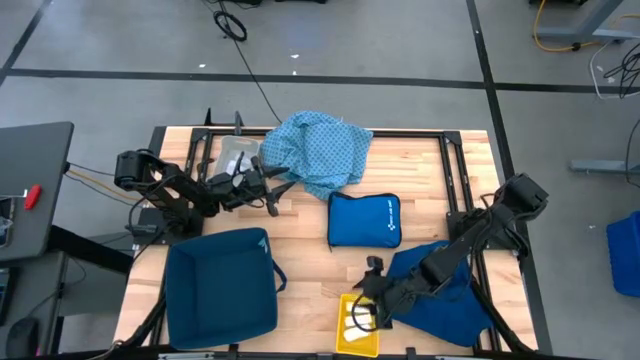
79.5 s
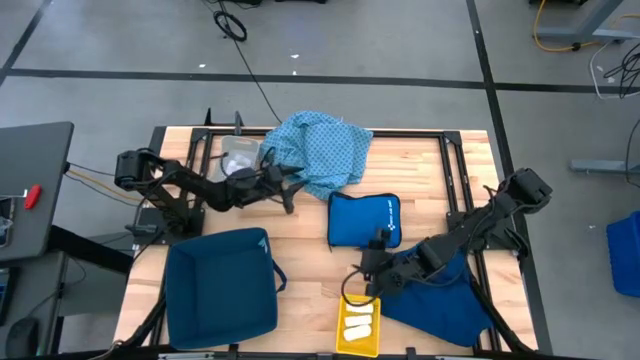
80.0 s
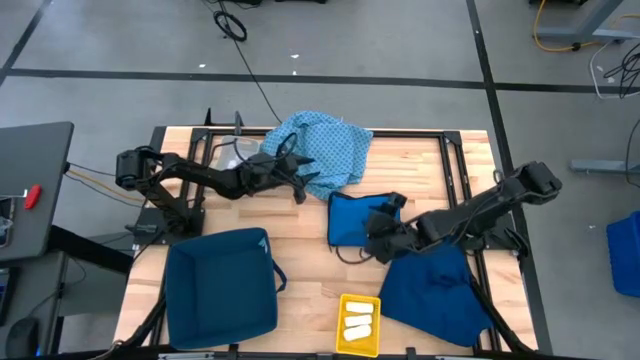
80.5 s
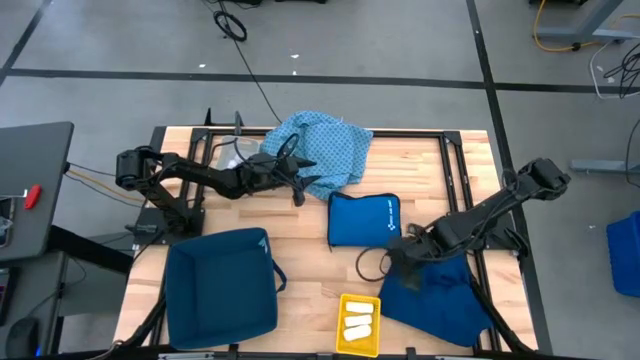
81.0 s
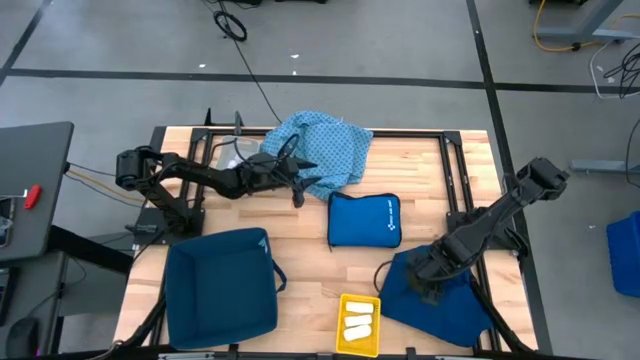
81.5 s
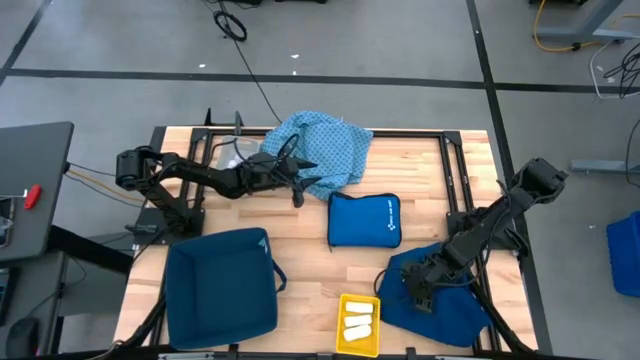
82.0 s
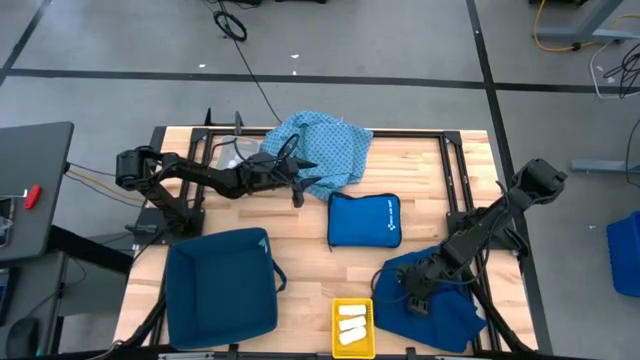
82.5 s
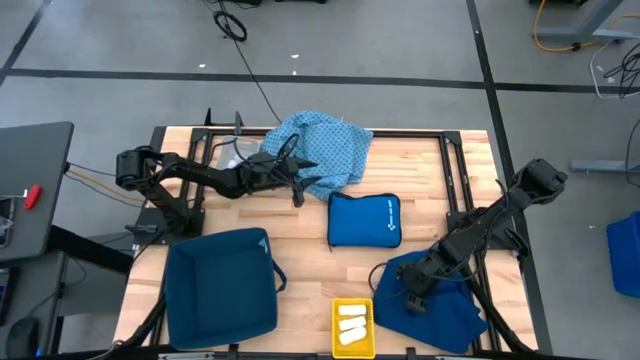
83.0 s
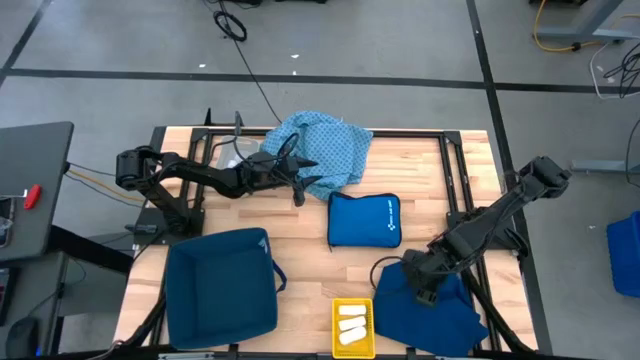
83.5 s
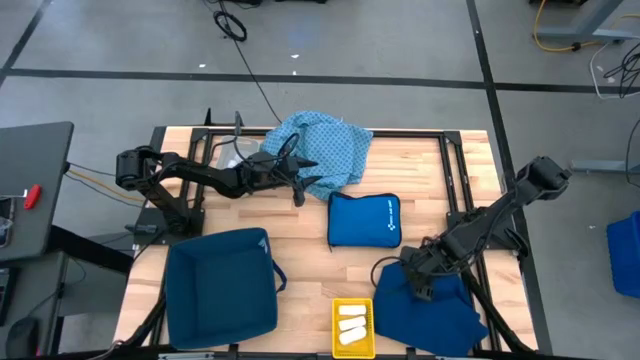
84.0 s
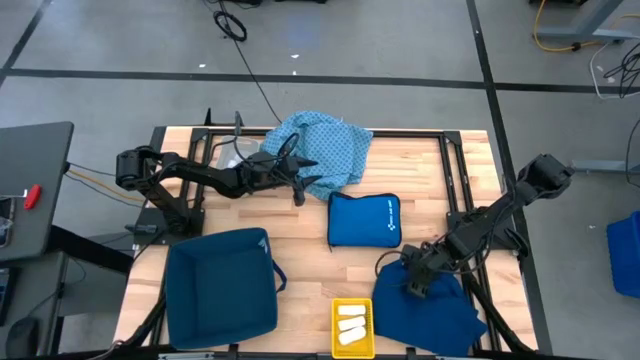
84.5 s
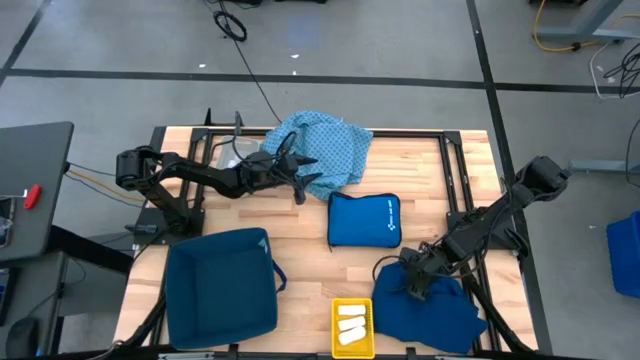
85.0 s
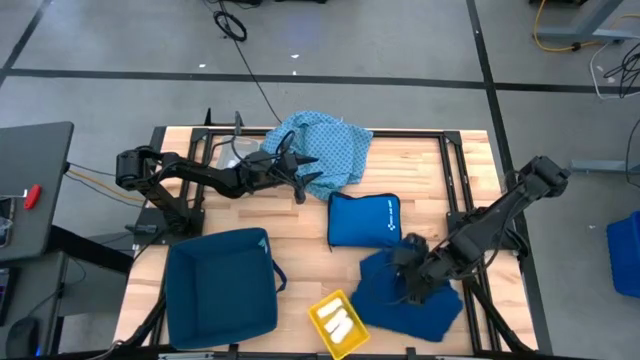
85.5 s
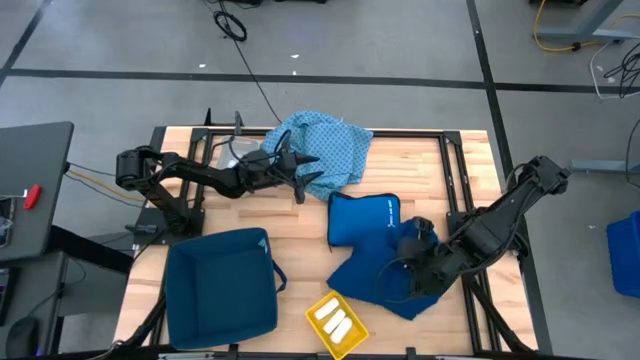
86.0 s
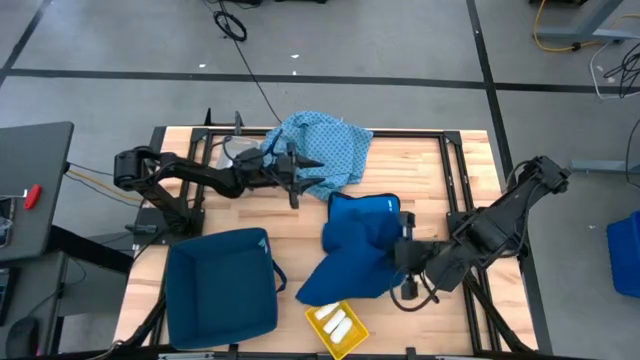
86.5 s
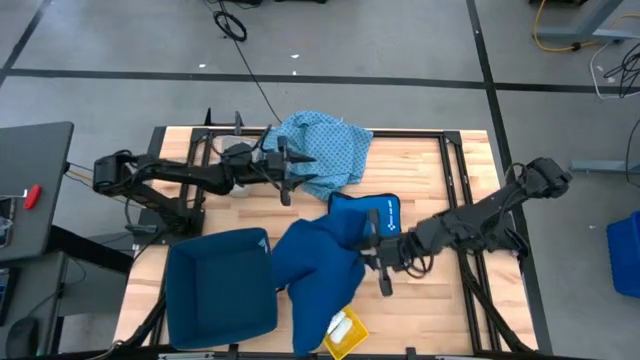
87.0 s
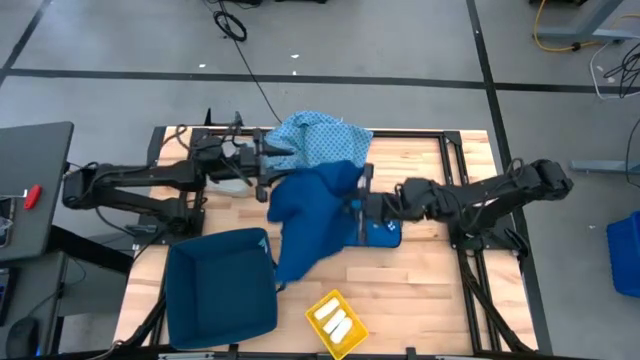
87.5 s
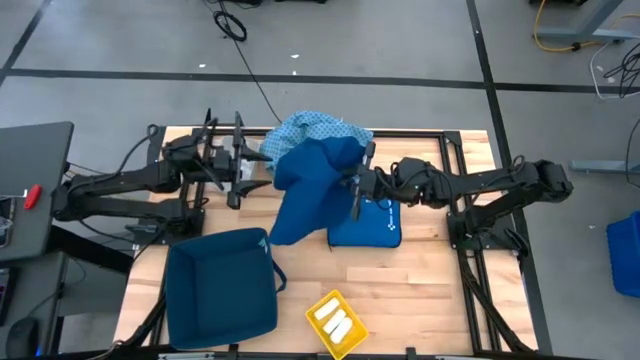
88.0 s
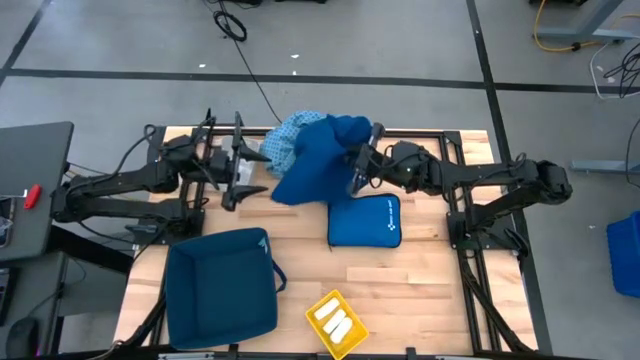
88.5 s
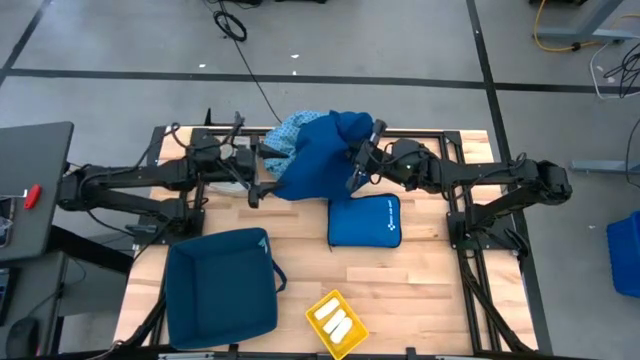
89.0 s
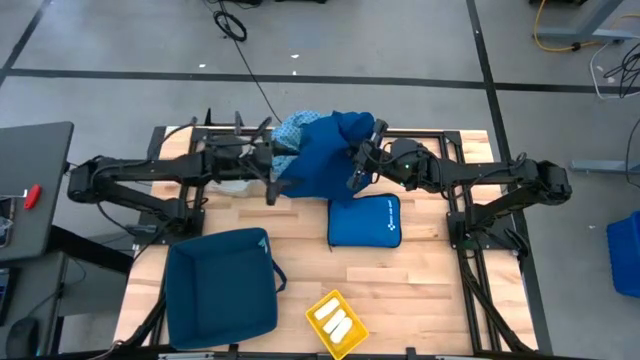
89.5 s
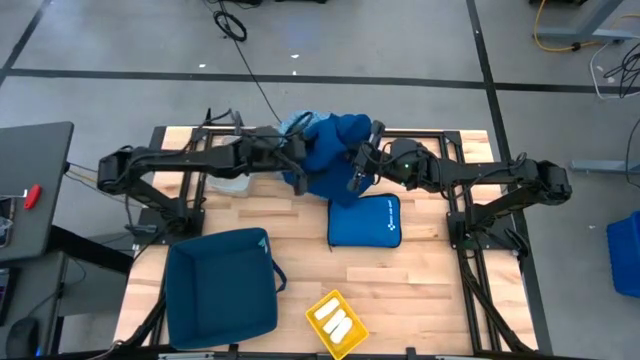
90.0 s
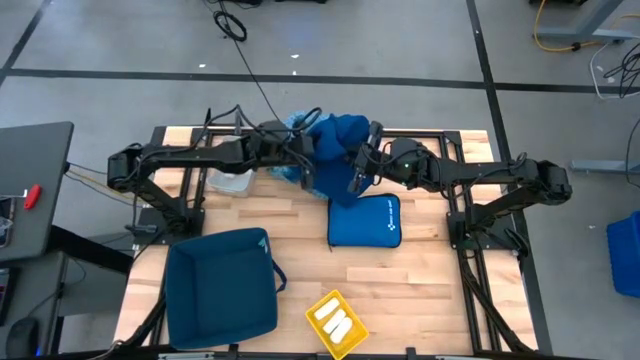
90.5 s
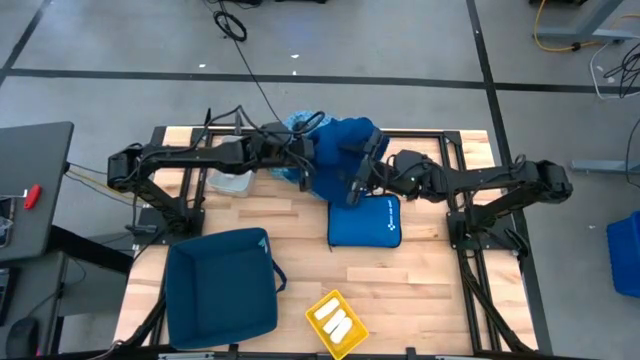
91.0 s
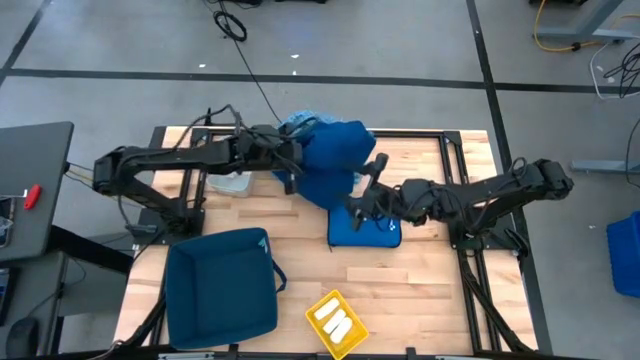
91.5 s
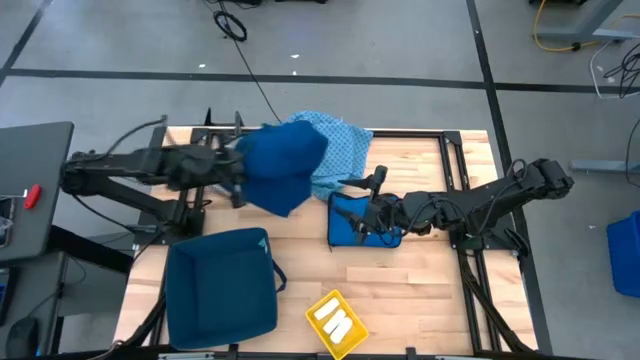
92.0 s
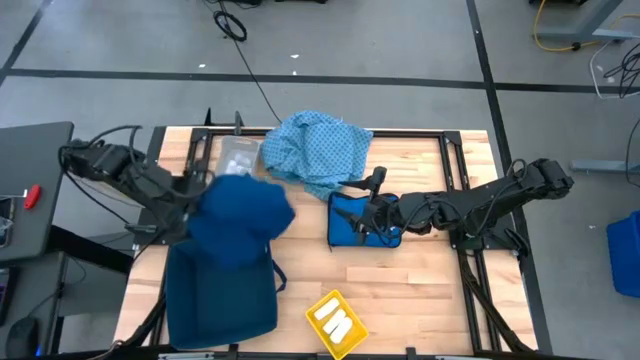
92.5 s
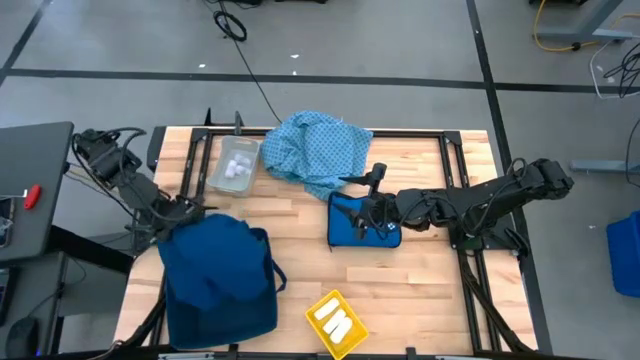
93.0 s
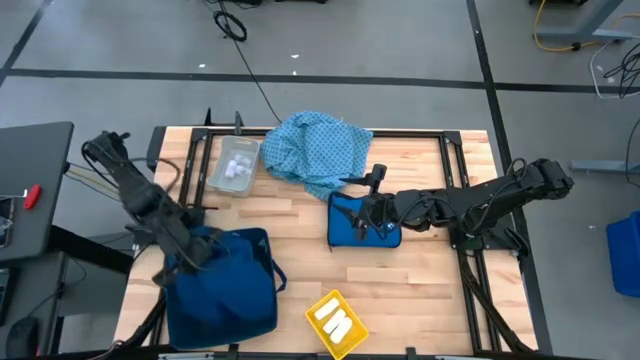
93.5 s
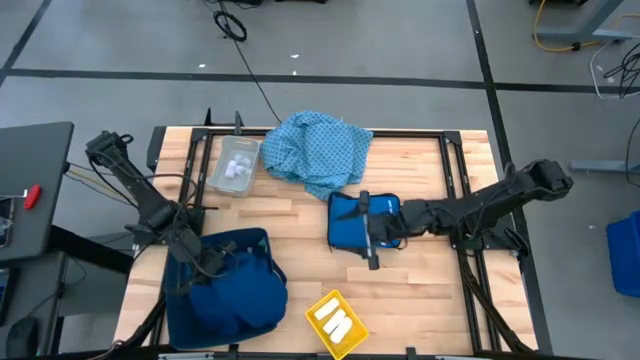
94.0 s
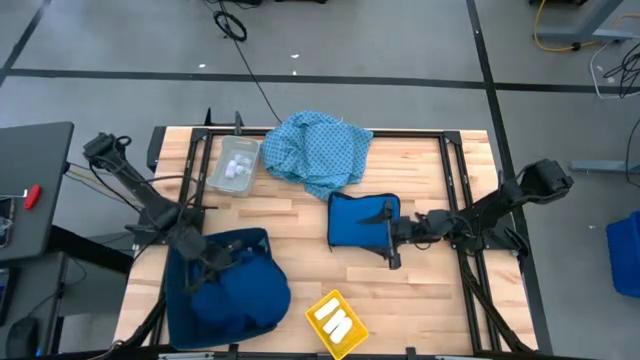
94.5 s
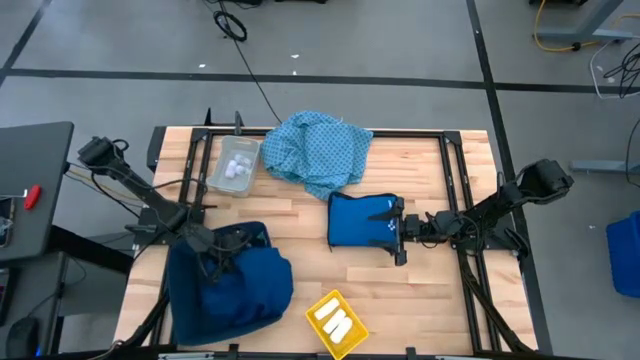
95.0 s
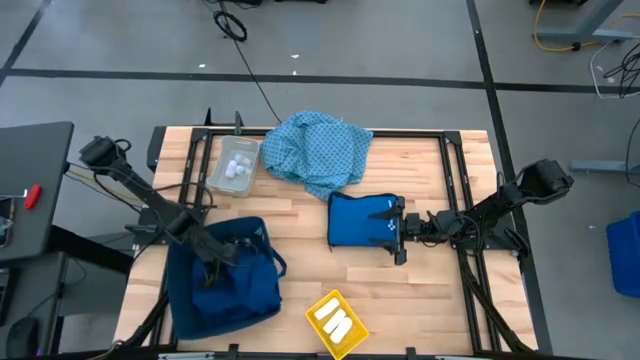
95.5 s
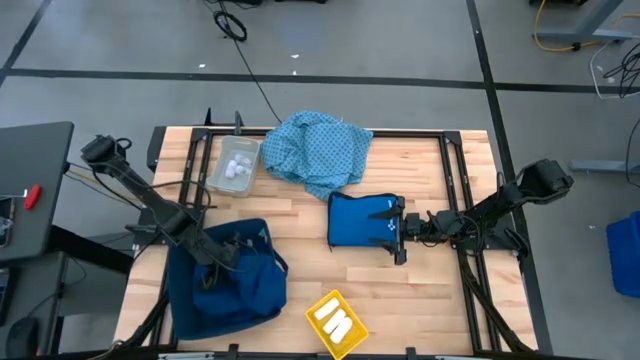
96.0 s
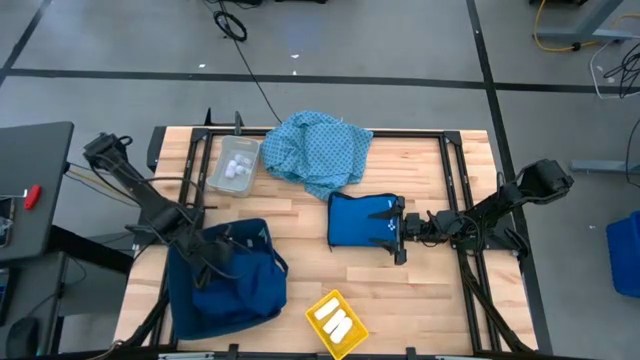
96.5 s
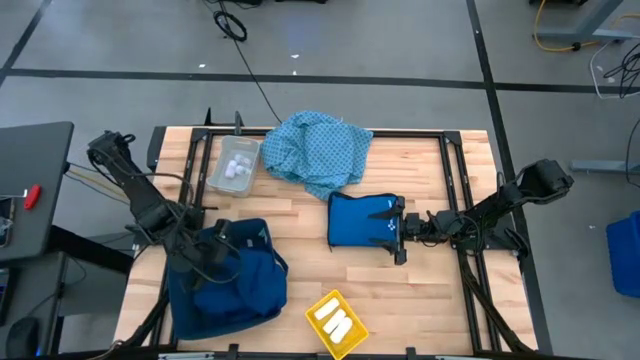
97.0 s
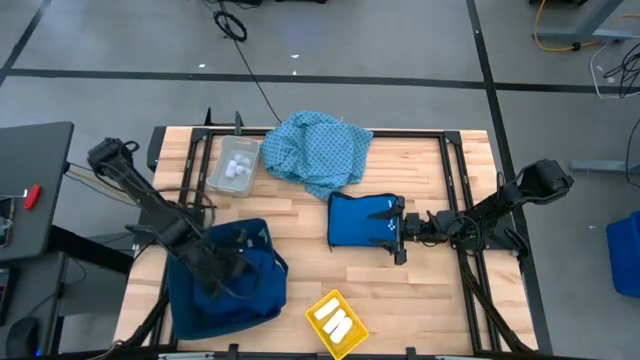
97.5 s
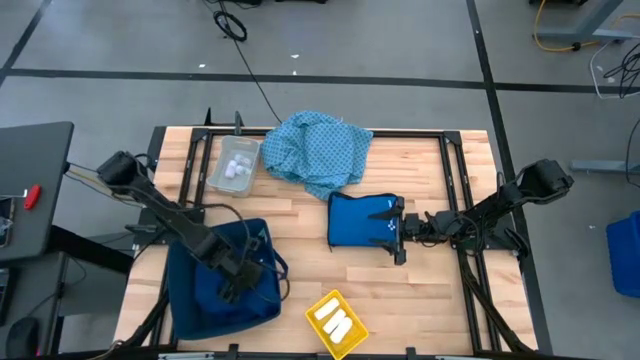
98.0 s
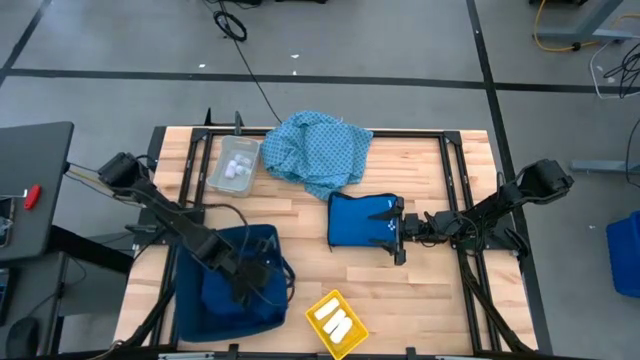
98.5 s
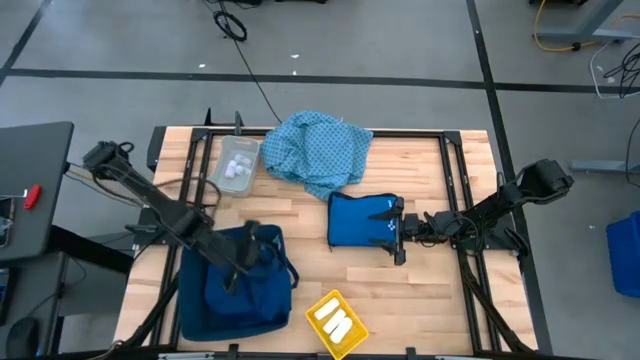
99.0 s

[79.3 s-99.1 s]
Task: Pick & place medical supplies in basket/bin
Put the dark blue patient gown into the blue bin

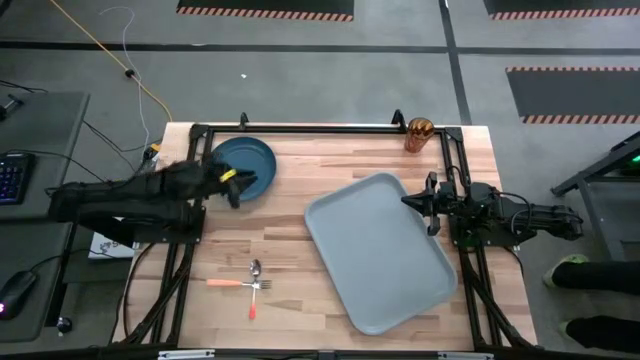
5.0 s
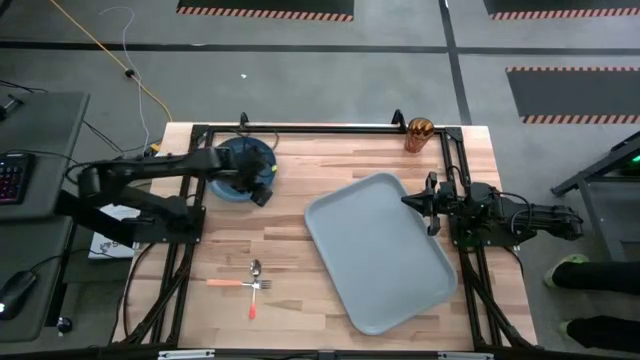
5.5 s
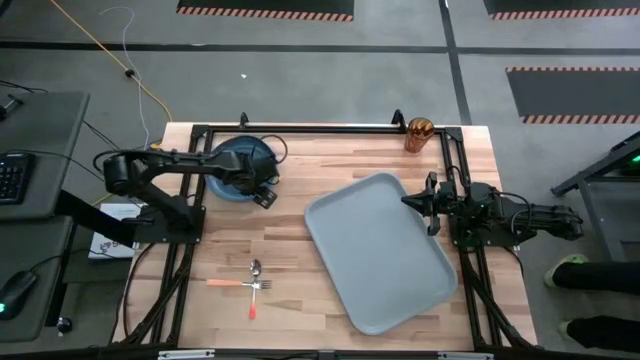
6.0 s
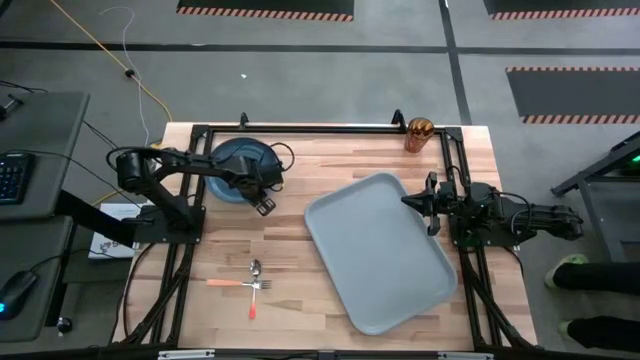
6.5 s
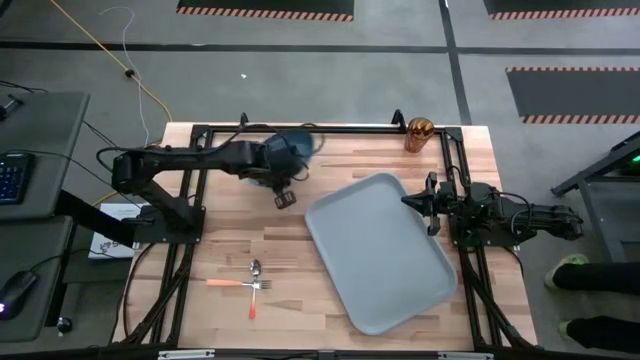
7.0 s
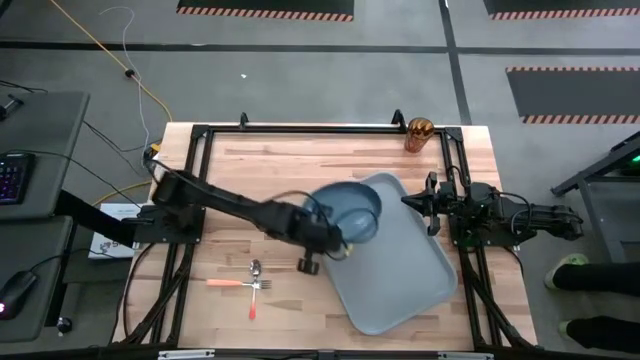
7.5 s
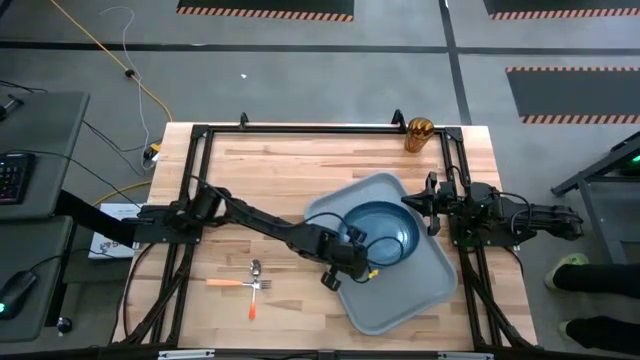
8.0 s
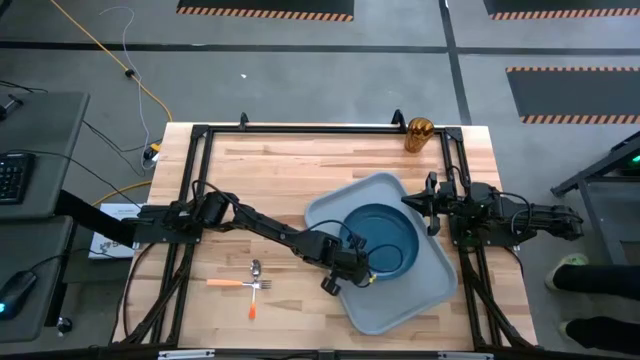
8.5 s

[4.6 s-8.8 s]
Task: Pick and place plate/cup/fork/spoon on tray
Put the blue plate on the gray serving tray
